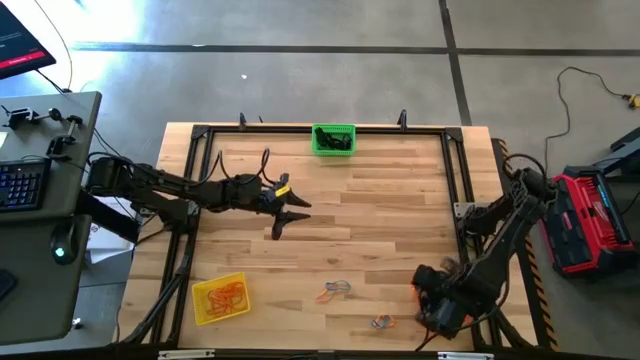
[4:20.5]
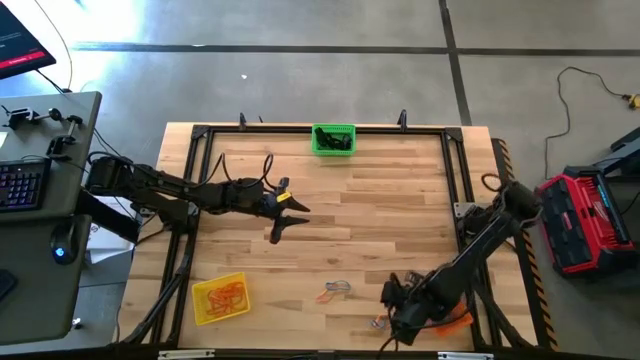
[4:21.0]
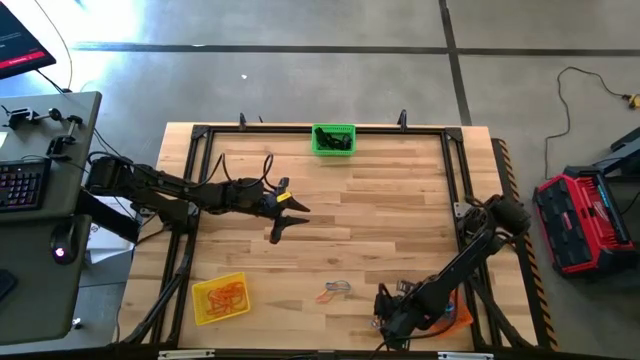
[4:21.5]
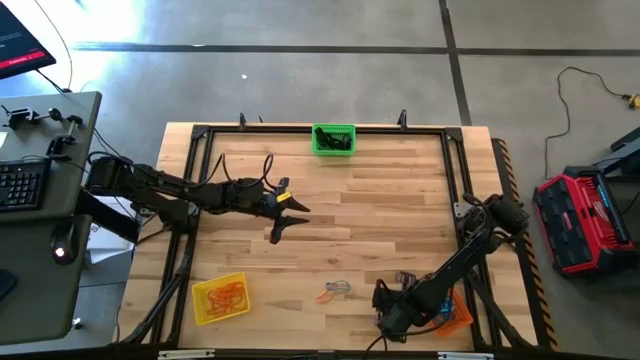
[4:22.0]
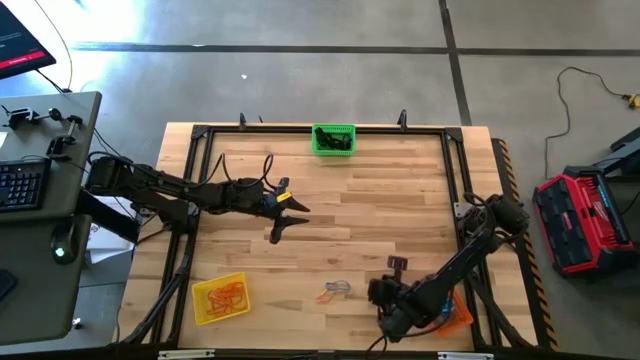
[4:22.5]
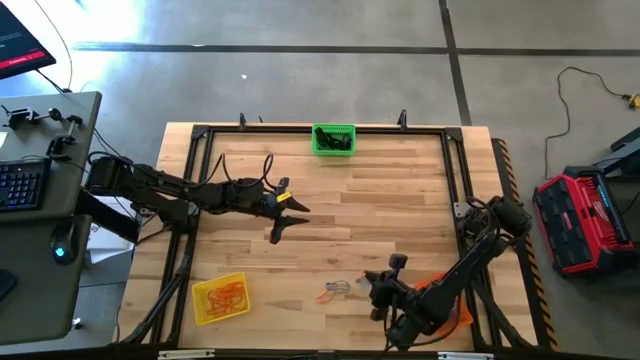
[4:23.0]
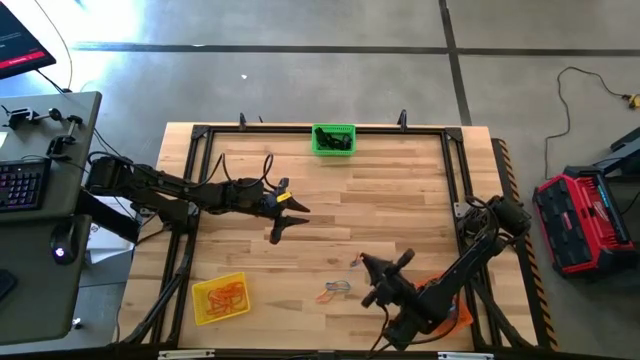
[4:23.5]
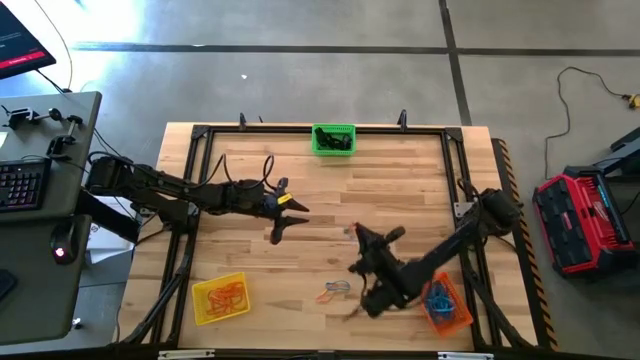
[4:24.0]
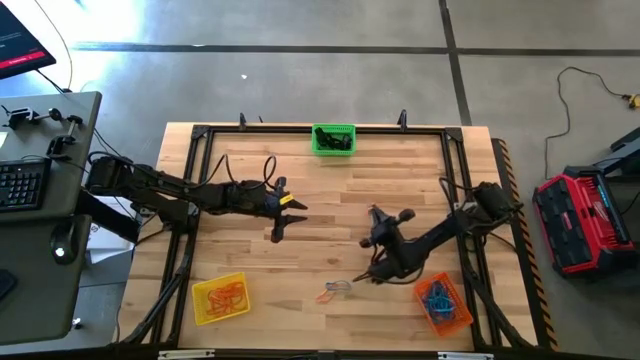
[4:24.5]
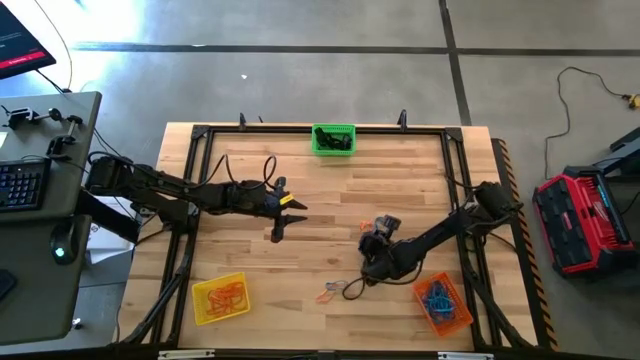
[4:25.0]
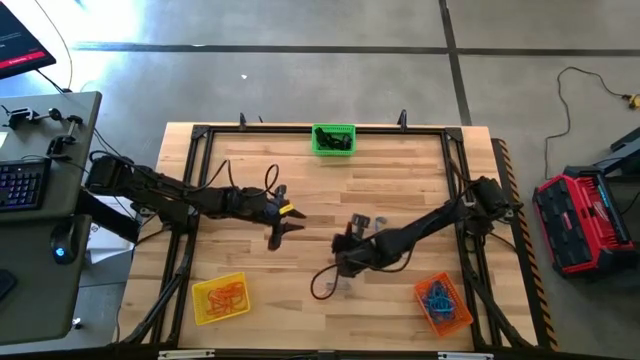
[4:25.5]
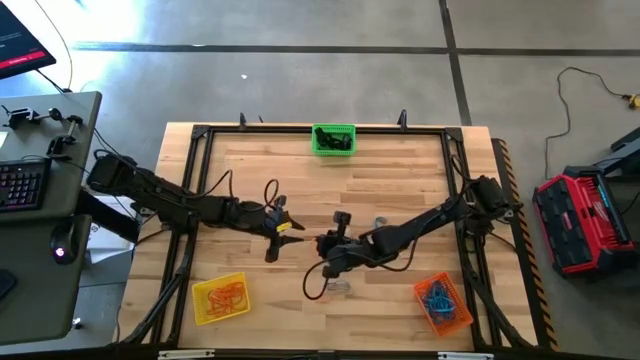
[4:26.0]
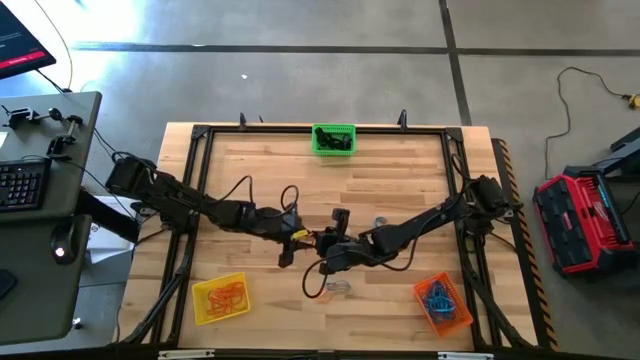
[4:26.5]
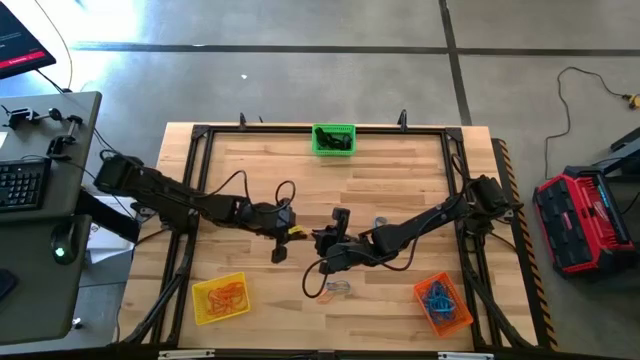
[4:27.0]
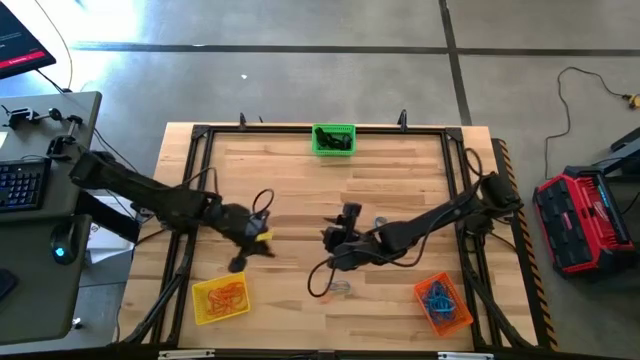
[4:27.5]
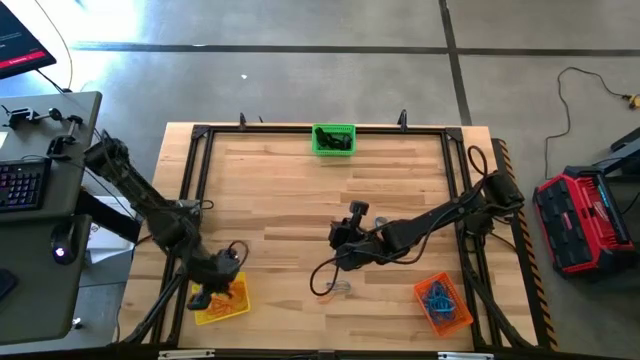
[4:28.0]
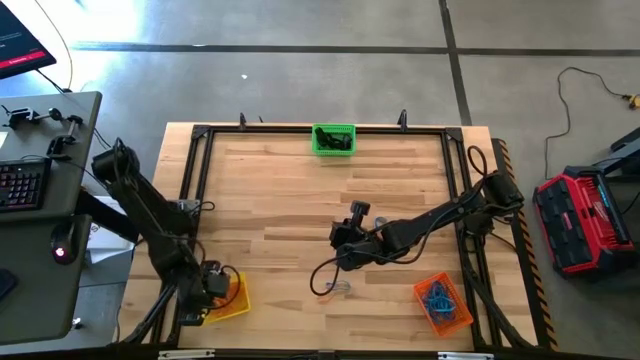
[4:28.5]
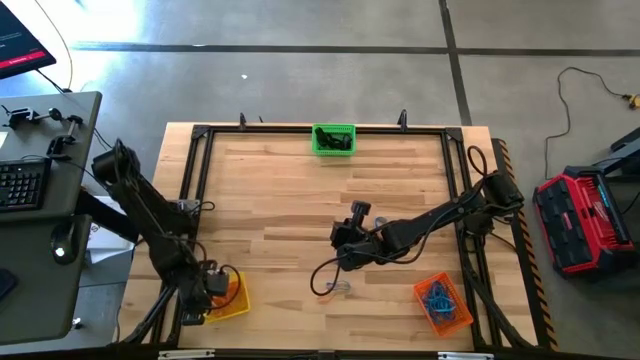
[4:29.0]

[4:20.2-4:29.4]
Task: Sort rubber bands into baskets
Put the orange rubber band into the yellow bin

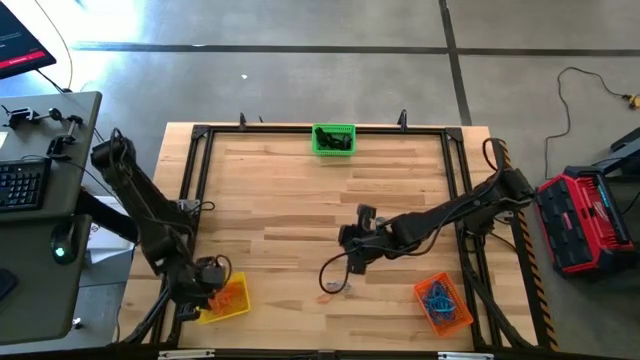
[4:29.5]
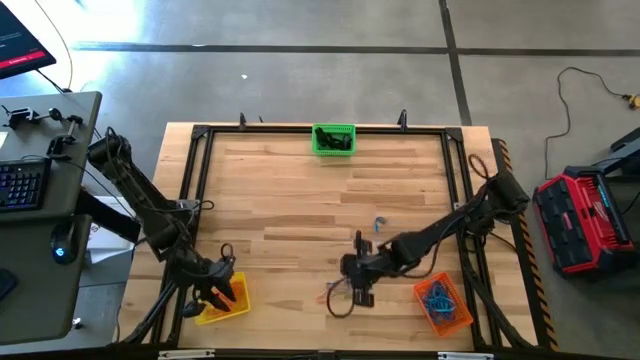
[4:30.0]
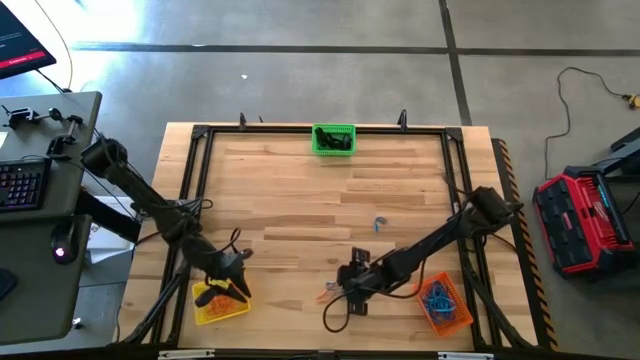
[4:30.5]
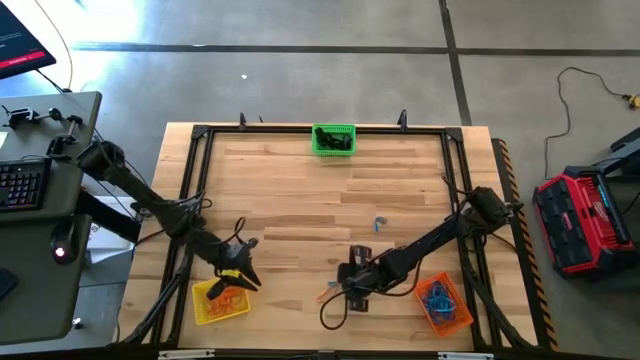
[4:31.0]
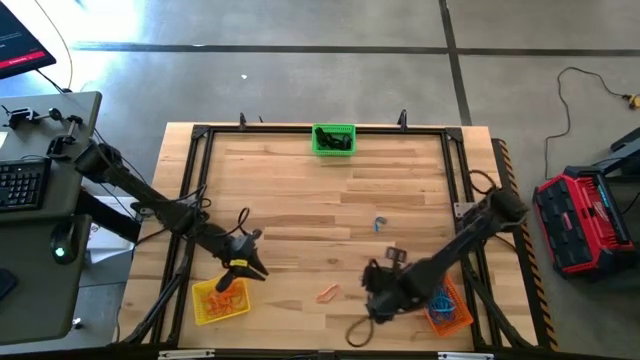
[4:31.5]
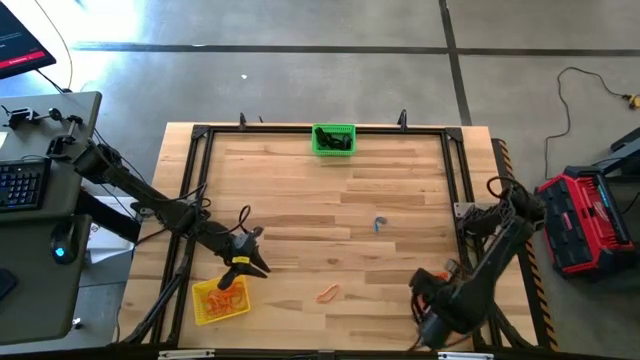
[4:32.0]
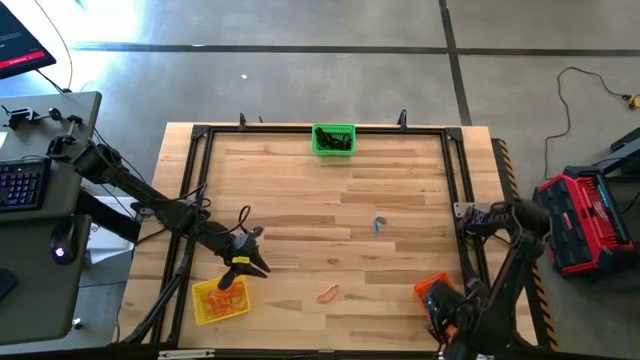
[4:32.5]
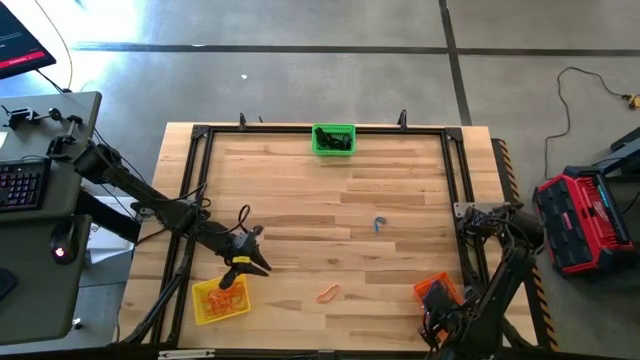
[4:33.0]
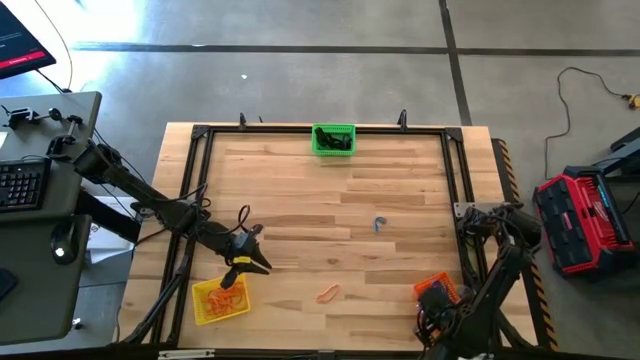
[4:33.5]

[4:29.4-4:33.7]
Put the blue rubber band into the orange bin

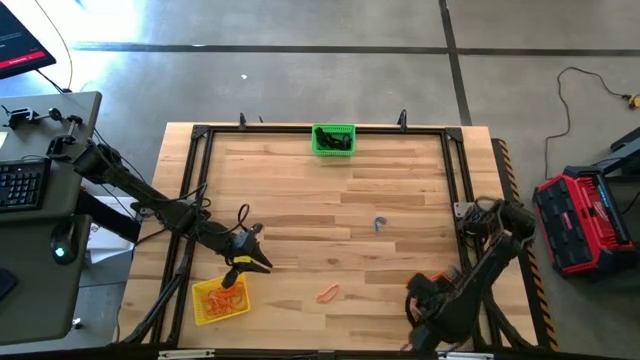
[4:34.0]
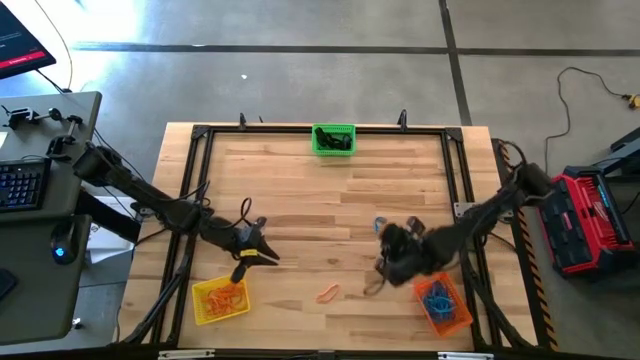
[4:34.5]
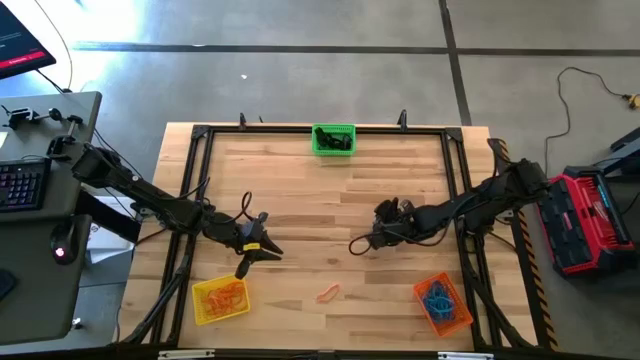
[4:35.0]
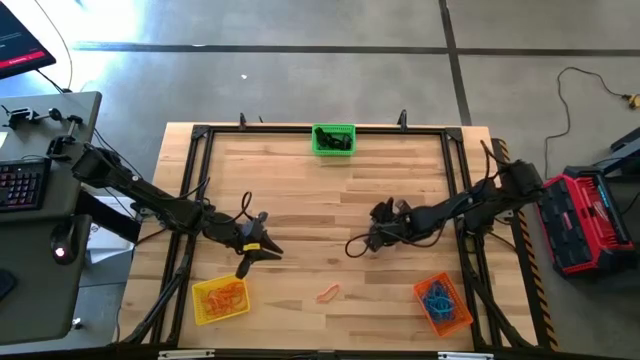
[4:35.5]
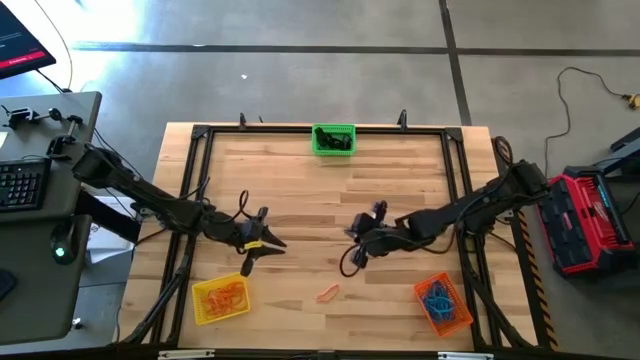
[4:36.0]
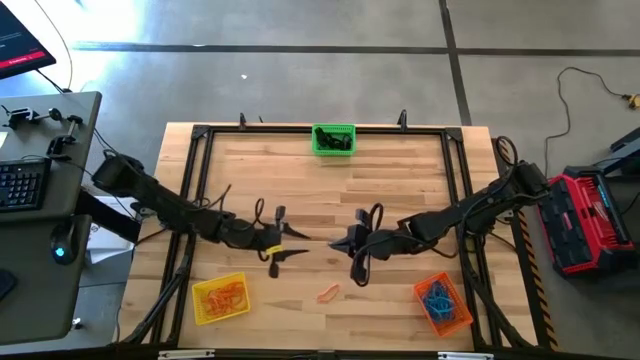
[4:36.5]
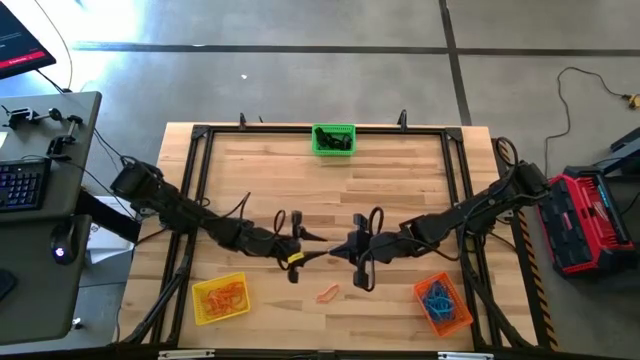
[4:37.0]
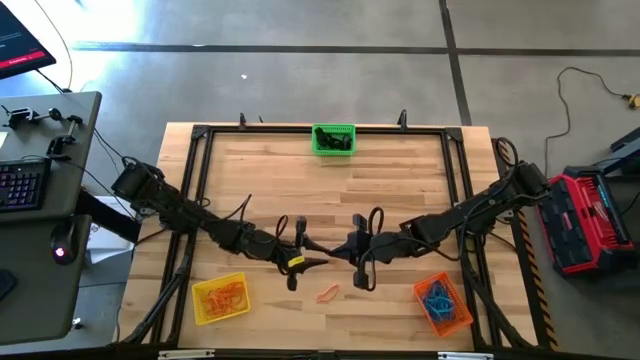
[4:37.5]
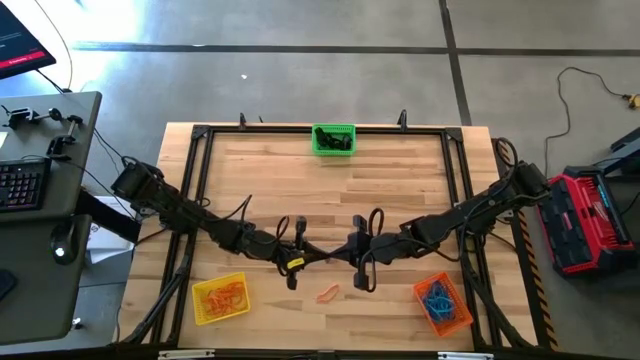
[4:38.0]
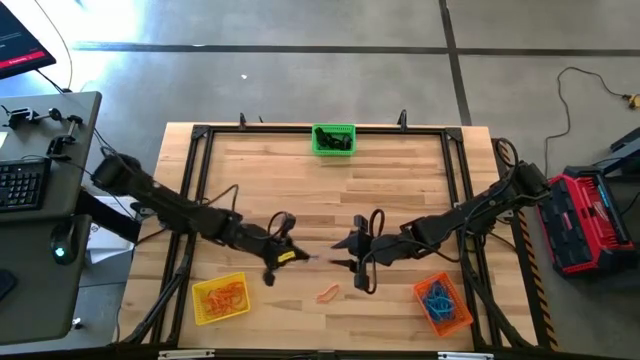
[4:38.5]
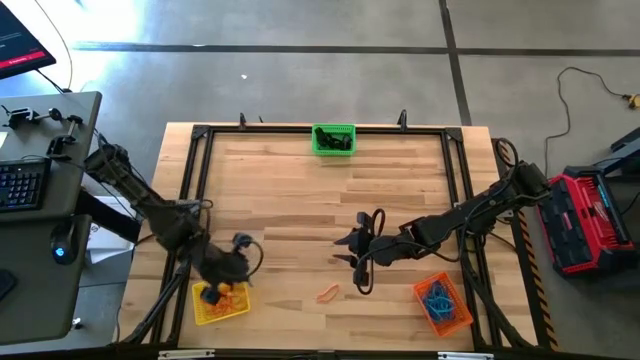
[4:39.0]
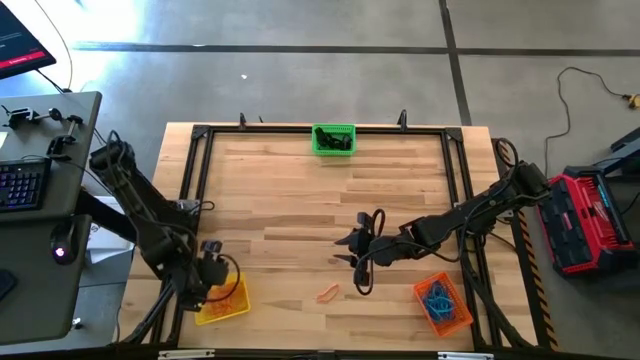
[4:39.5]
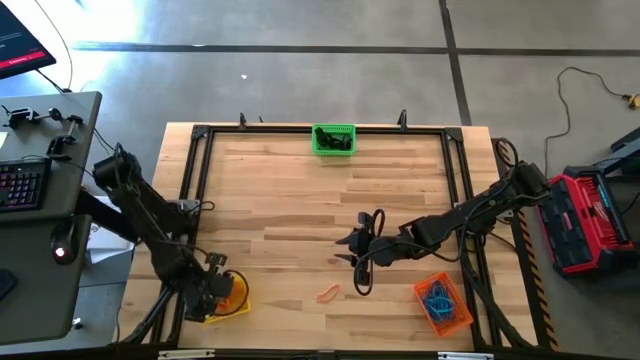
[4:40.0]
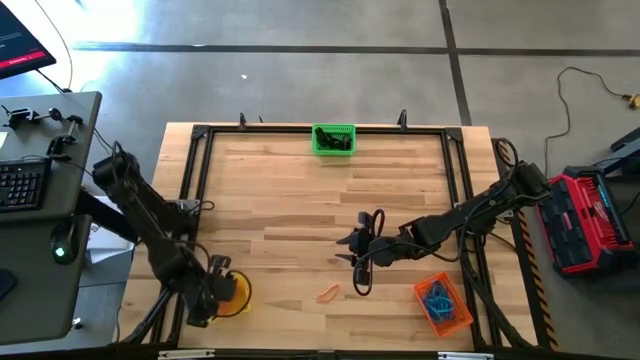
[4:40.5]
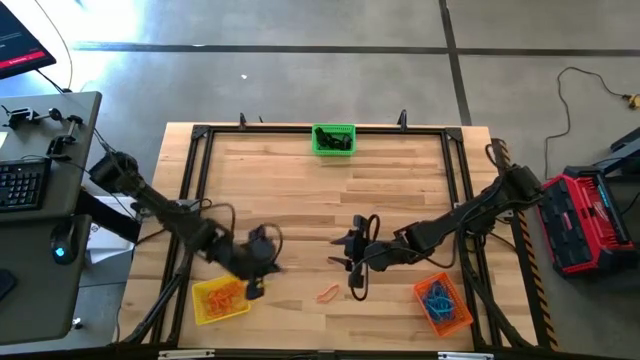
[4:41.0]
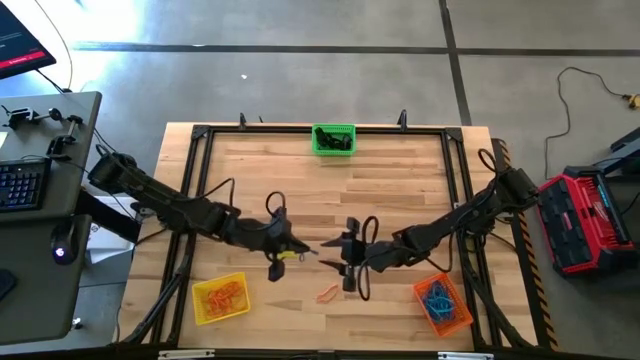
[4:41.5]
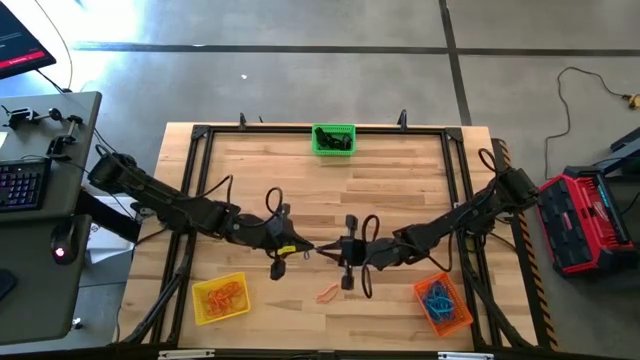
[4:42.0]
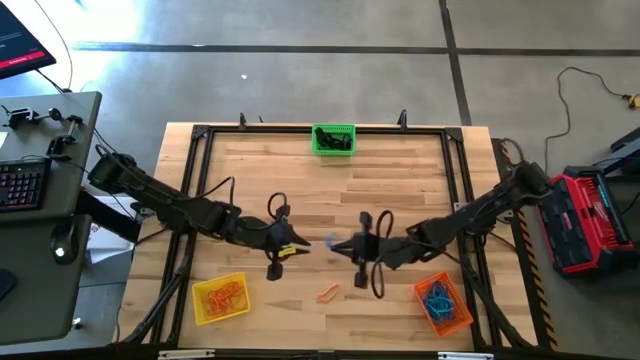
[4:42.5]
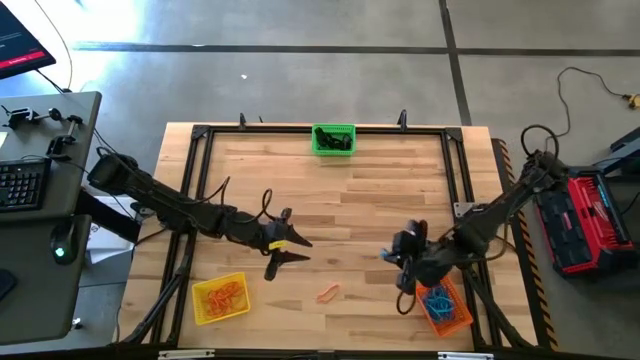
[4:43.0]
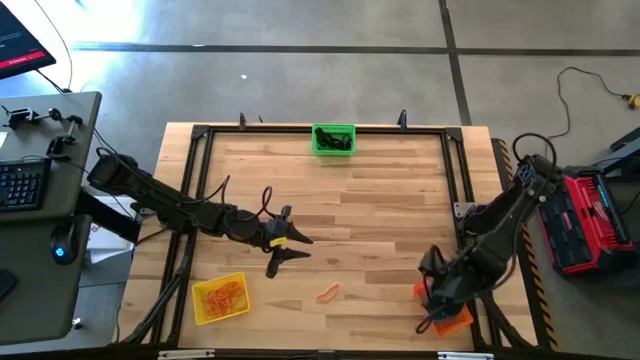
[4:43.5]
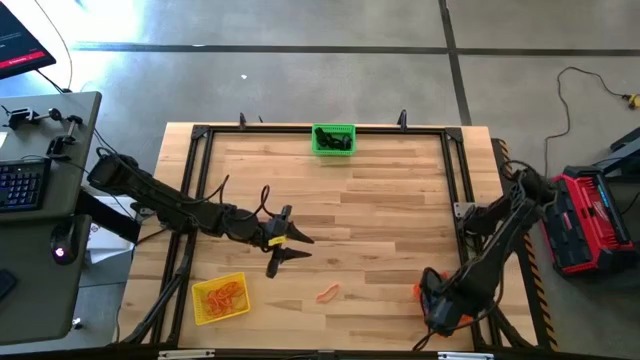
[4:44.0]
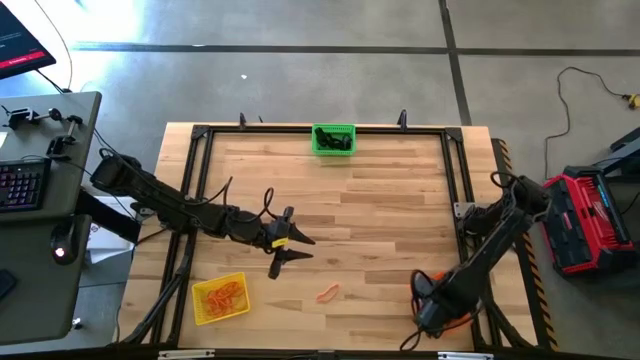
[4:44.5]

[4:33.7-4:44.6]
Put the blue rubber band into the orange bin
